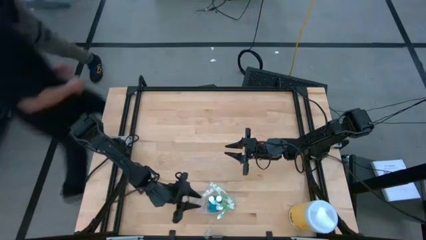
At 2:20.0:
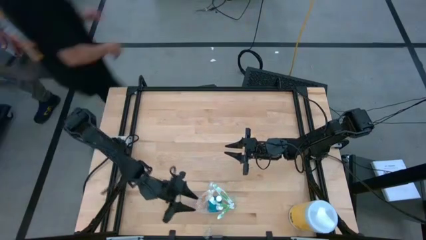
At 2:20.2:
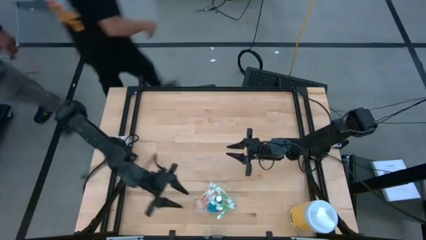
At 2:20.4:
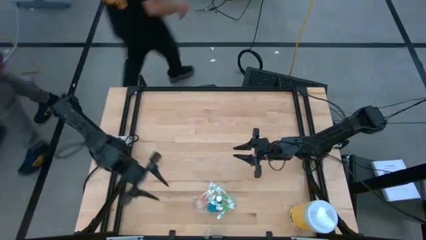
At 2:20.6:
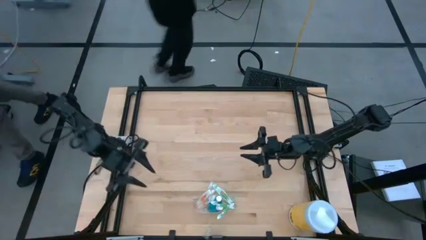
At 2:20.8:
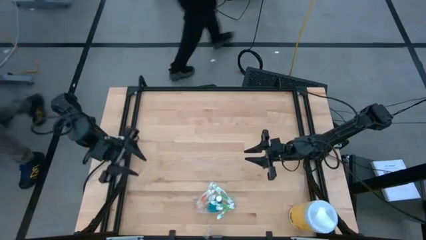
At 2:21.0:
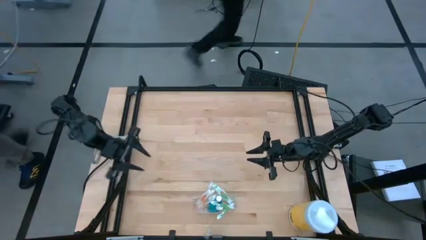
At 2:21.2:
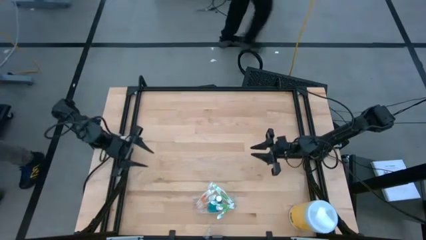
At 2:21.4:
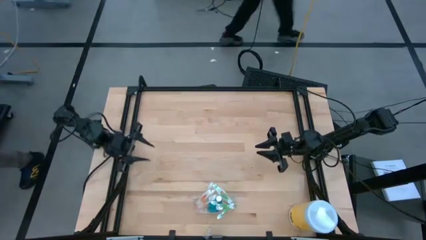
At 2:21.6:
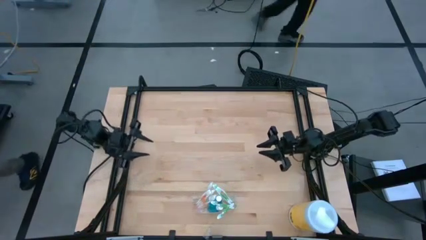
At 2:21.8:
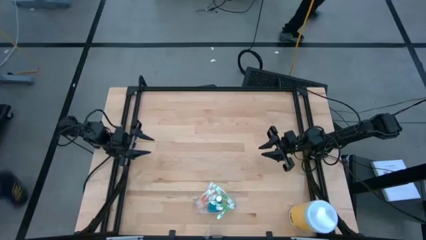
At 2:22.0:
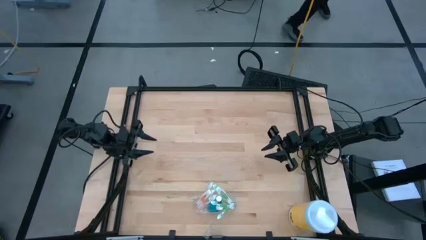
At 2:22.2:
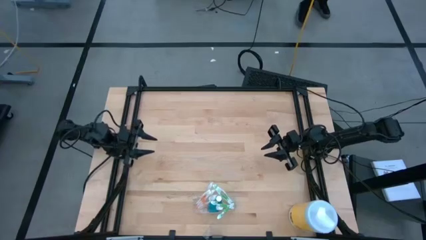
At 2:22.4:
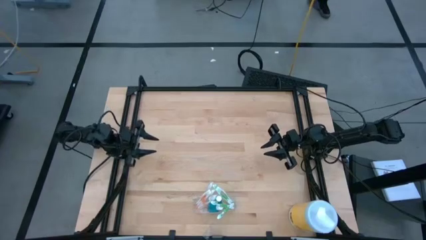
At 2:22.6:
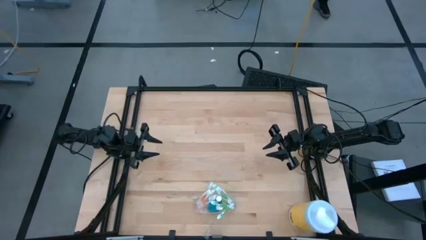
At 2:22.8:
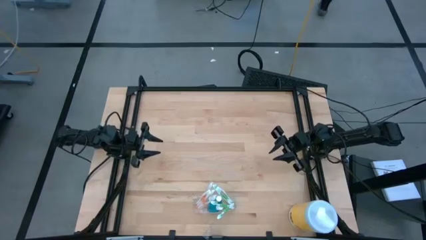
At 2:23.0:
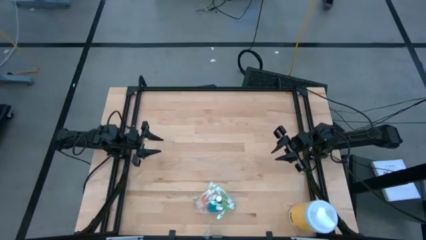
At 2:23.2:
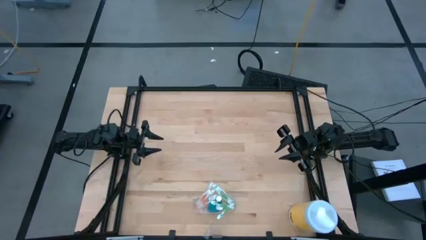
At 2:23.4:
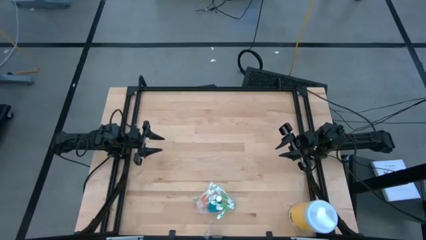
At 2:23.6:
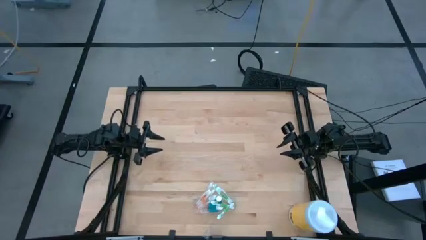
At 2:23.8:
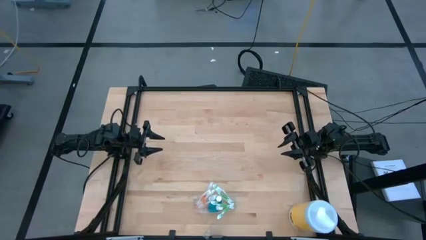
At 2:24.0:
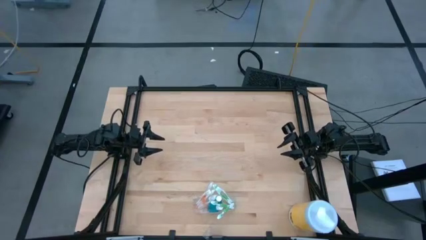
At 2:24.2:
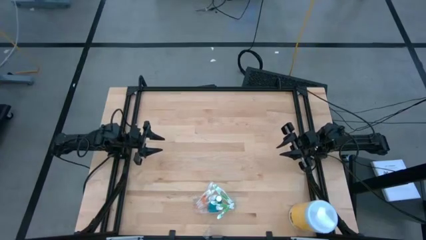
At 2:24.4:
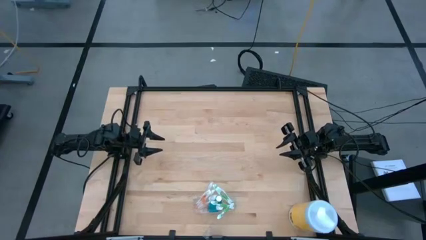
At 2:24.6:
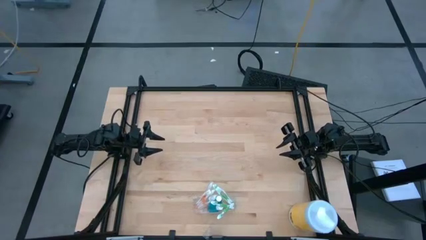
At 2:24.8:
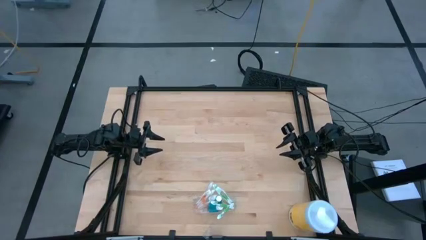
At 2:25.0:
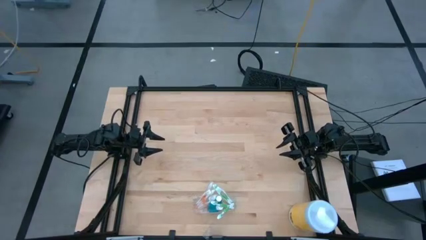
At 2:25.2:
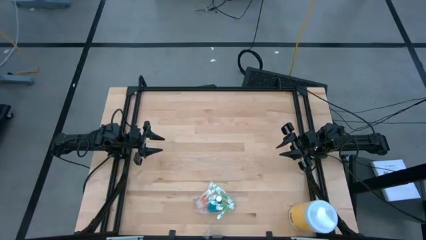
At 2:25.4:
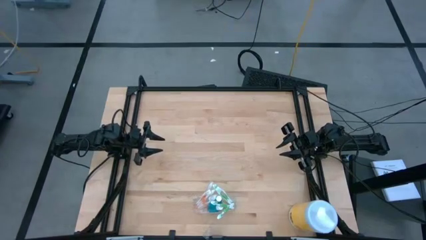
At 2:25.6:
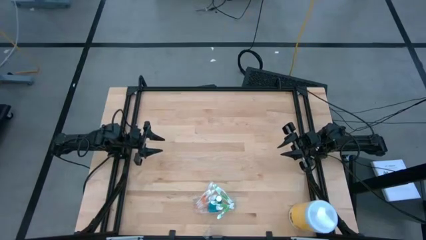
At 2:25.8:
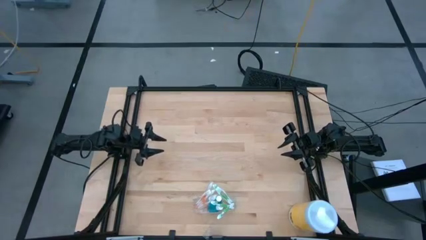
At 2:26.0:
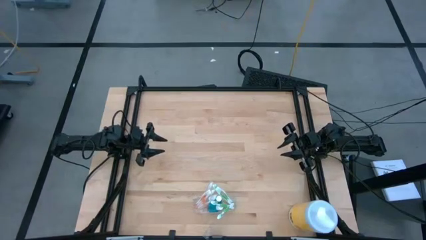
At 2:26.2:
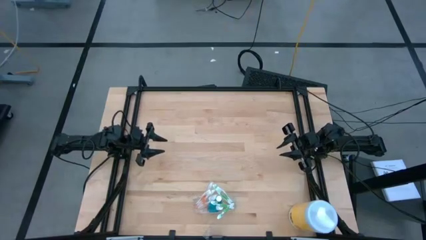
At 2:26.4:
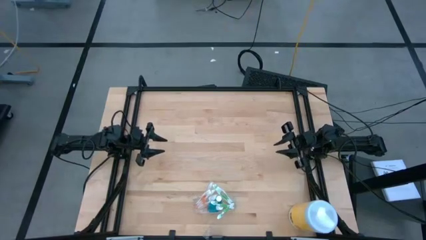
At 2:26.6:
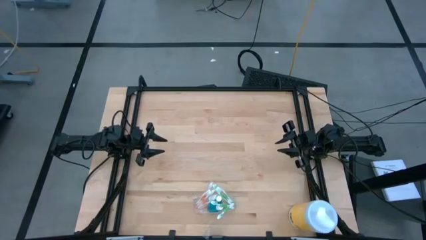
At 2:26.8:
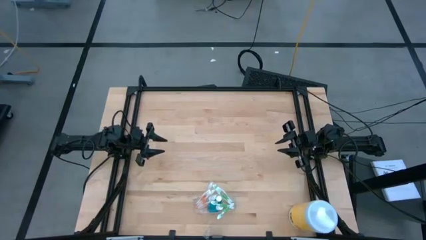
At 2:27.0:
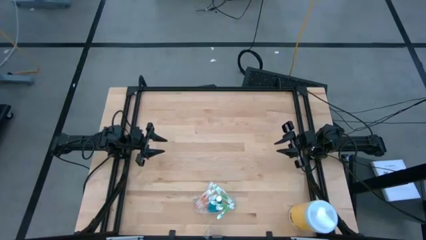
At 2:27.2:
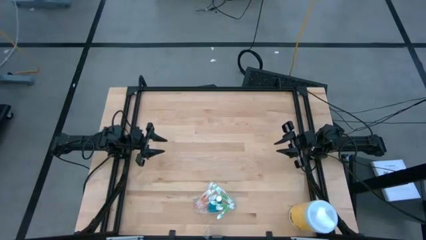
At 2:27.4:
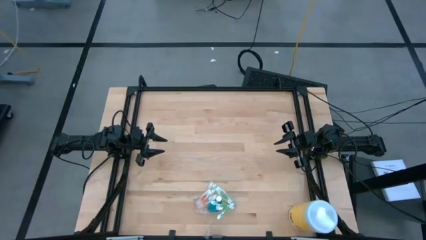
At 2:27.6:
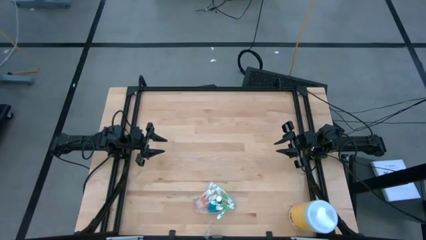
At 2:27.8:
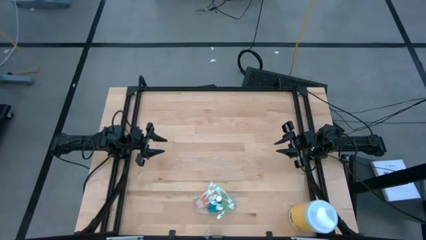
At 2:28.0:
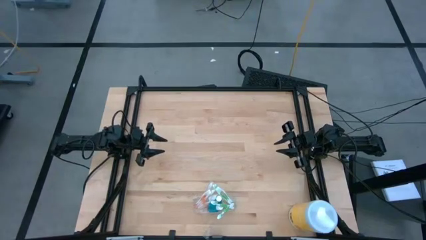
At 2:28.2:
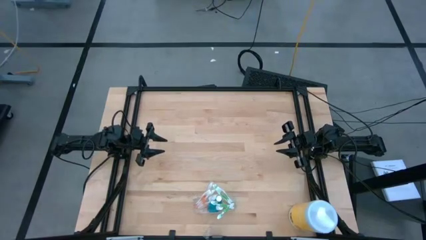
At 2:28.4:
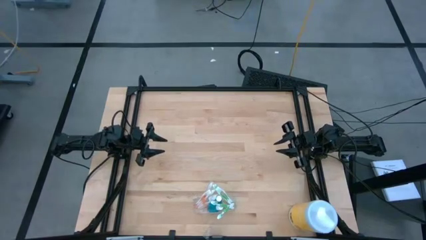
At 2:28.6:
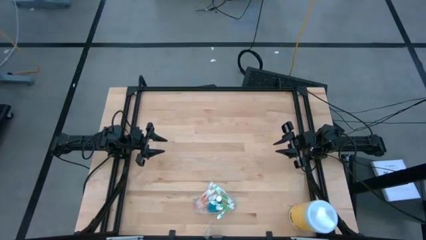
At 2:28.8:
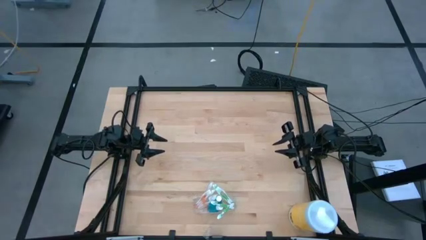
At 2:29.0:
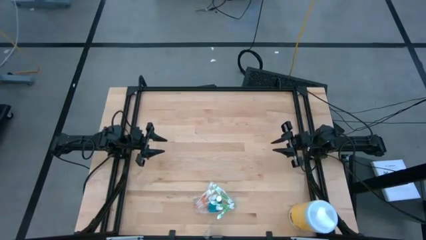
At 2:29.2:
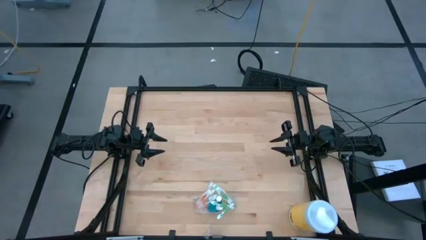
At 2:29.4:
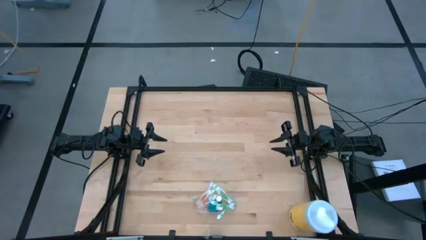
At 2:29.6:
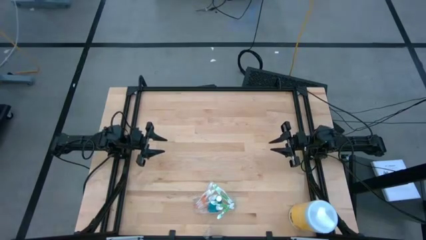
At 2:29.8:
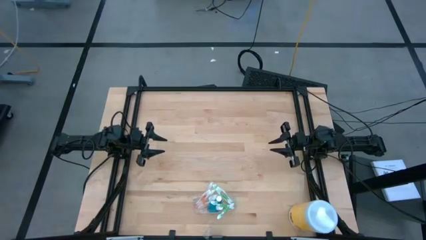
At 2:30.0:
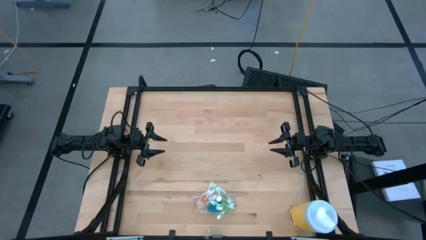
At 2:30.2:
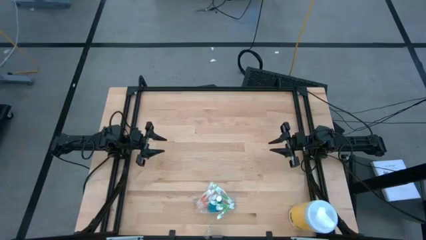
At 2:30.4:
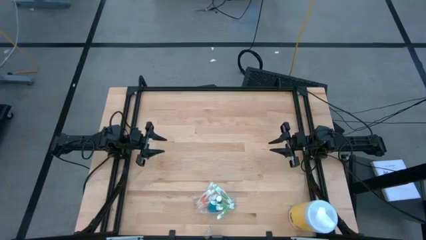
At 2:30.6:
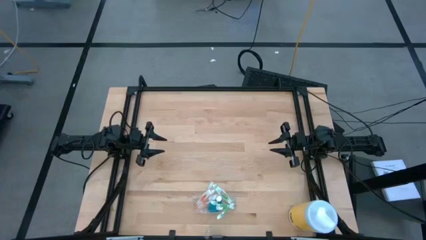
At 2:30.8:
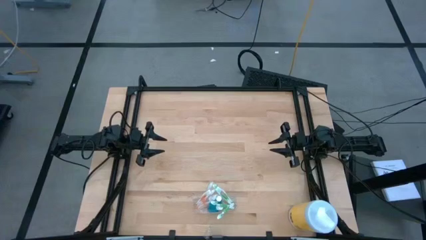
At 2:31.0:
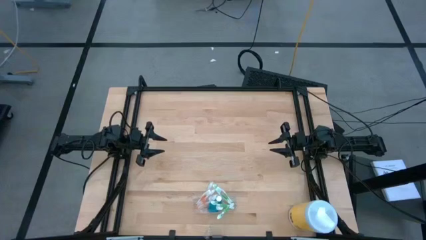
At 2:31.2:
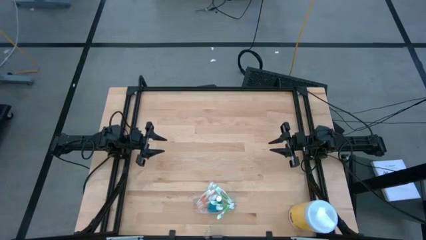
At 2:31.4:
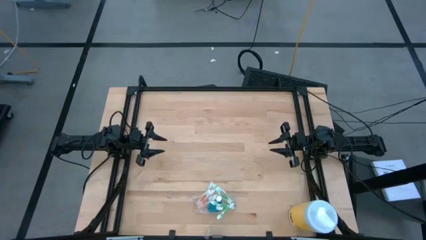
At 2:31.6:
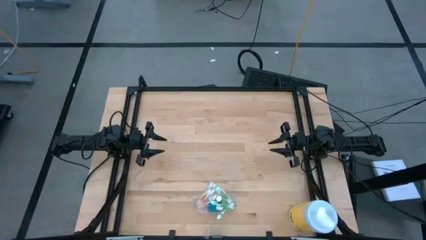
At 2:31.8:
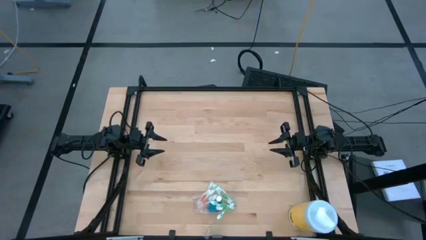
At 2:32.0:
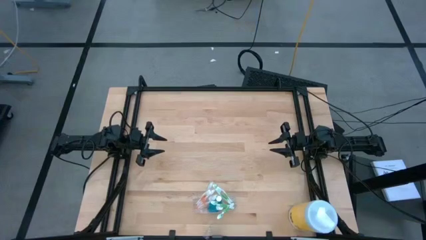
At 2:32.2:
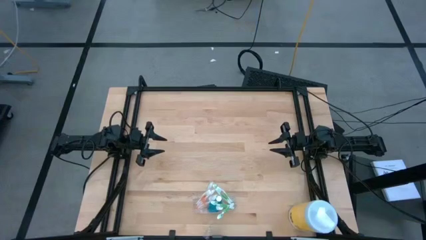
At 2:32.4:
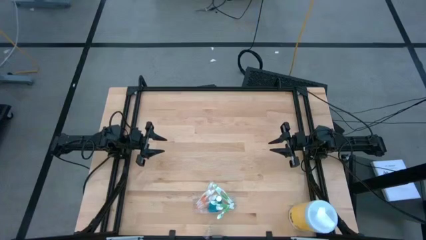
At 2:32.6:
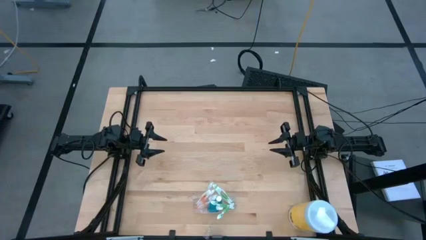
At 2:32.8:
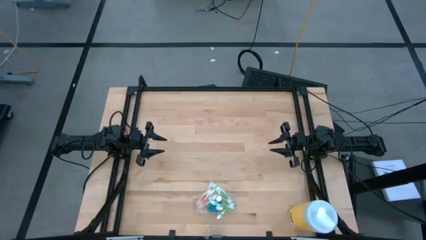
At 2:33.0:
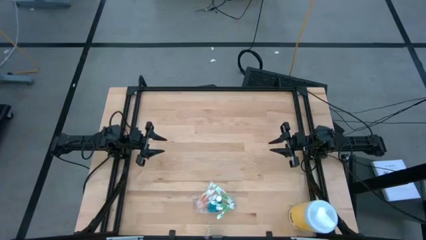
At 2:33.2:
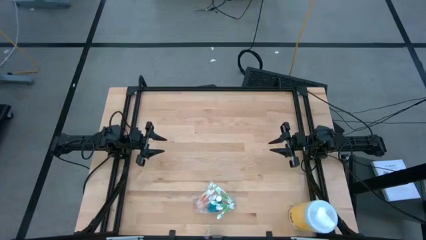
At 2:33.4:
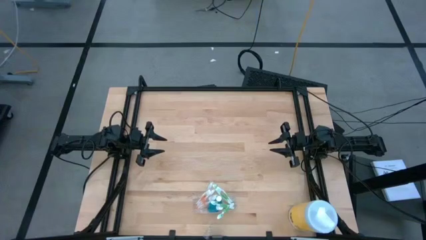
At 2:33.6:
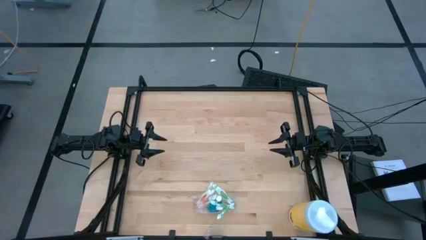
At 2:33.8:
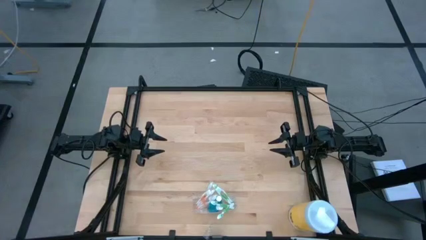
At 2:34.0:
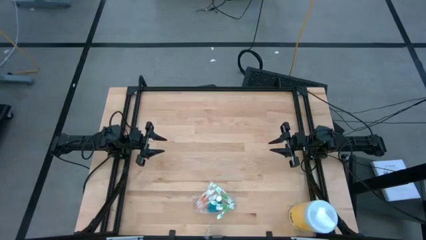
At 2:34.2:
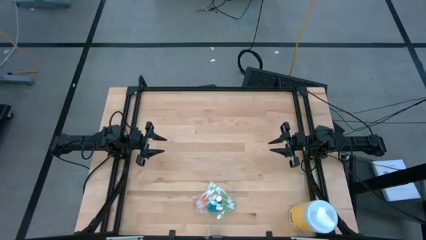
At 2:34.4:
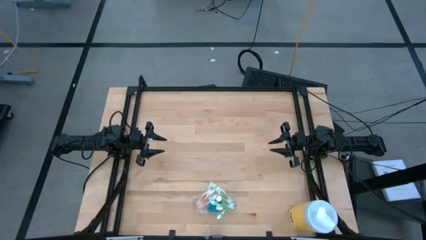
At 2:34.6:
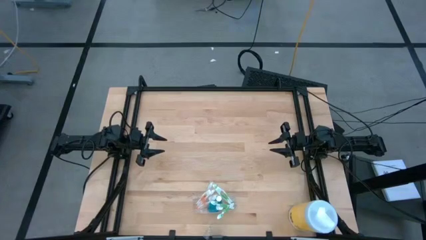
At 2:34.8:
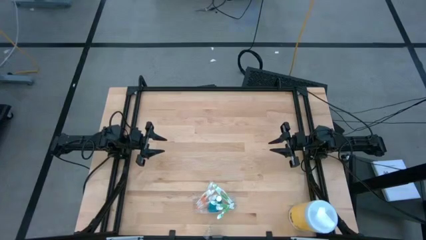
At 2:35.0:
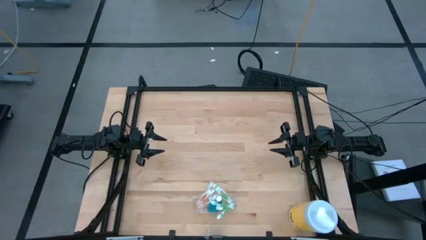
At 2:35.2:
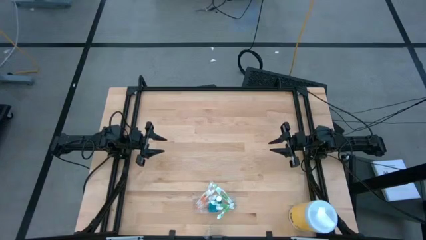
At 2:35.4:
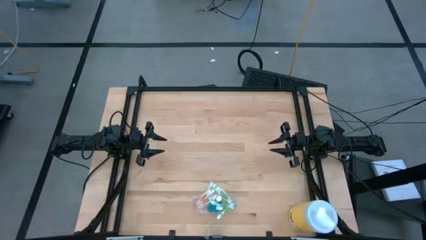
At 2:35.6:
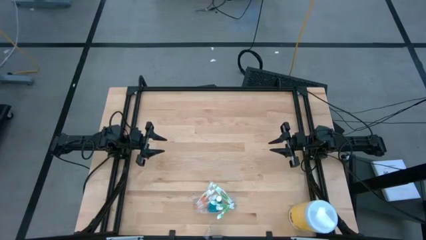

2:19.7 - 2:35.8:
Task: Pick & Place toothbrushing station
Return to Home Position
